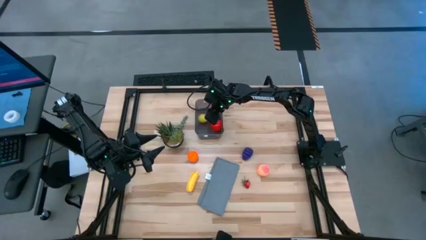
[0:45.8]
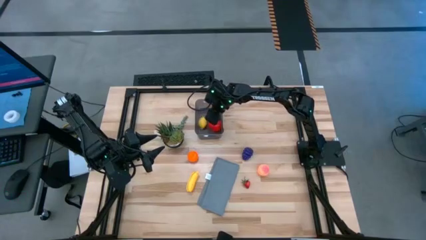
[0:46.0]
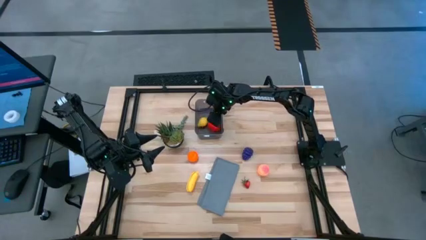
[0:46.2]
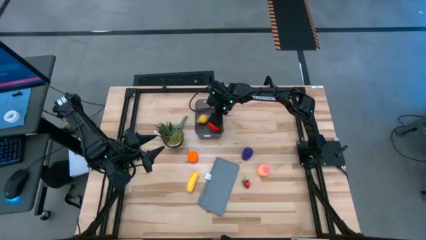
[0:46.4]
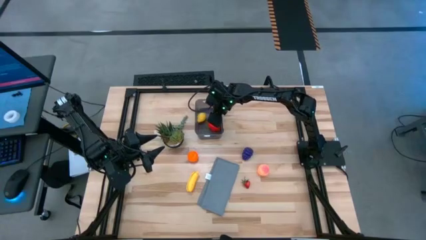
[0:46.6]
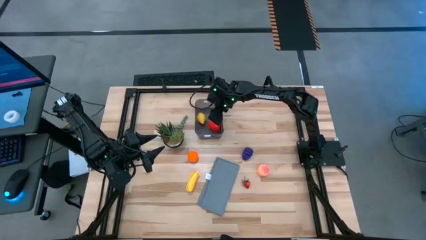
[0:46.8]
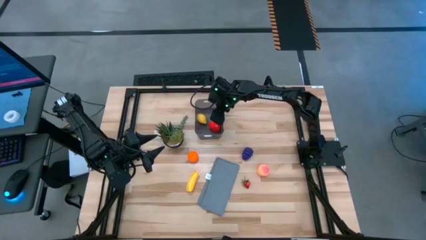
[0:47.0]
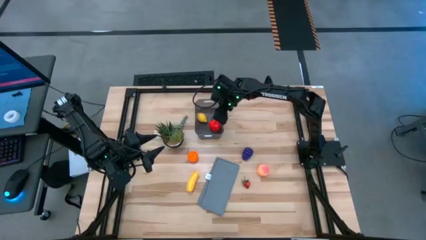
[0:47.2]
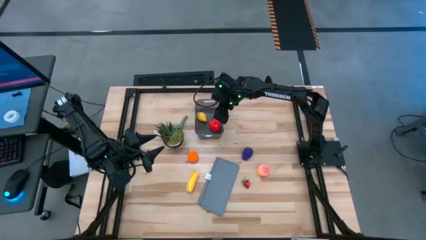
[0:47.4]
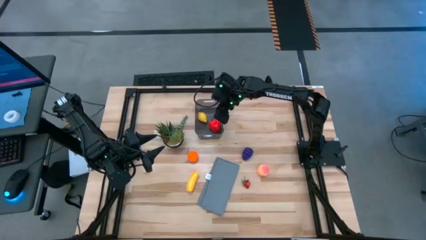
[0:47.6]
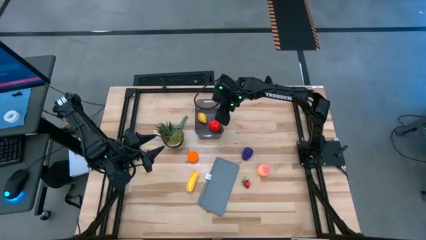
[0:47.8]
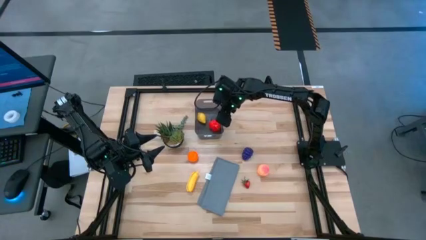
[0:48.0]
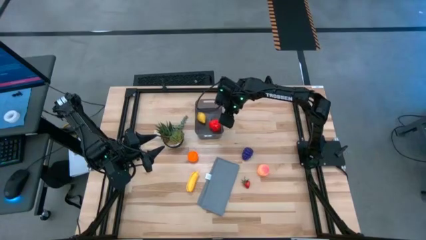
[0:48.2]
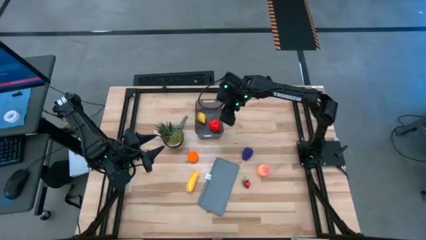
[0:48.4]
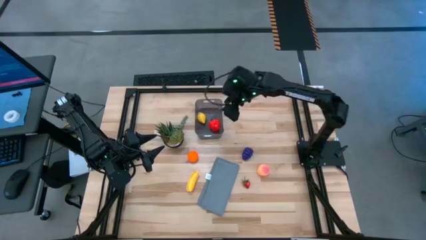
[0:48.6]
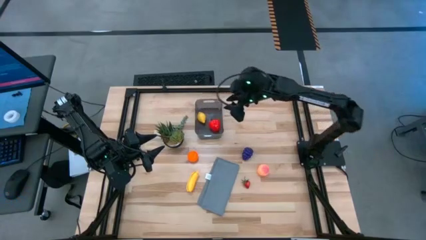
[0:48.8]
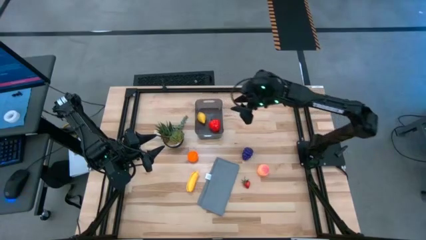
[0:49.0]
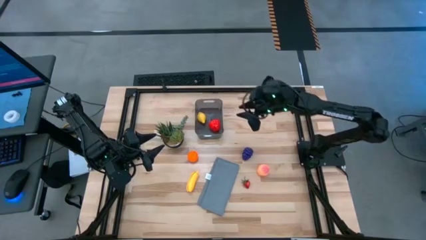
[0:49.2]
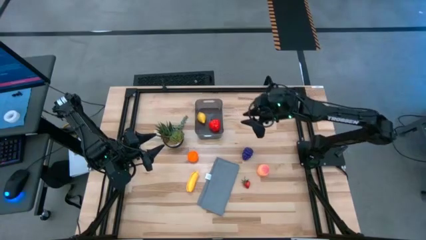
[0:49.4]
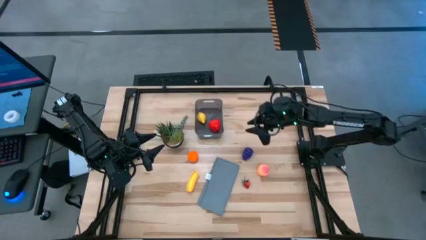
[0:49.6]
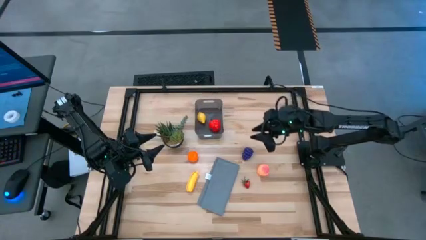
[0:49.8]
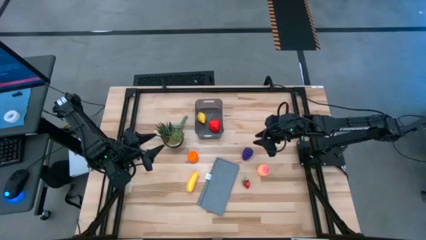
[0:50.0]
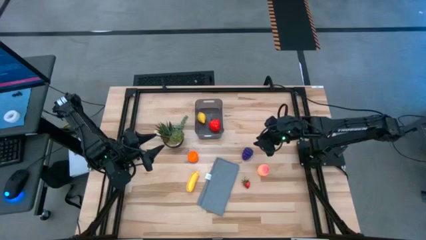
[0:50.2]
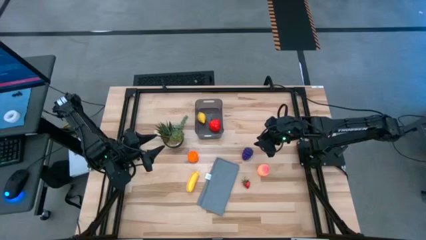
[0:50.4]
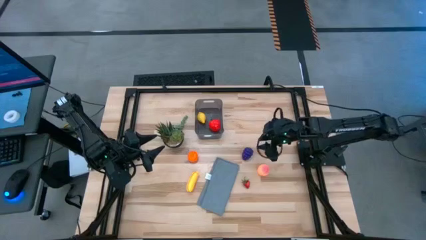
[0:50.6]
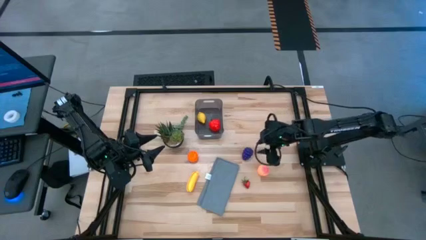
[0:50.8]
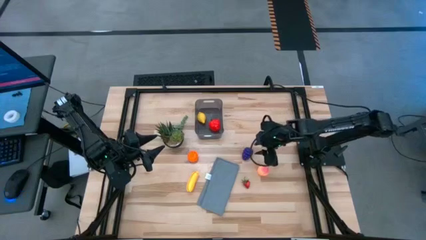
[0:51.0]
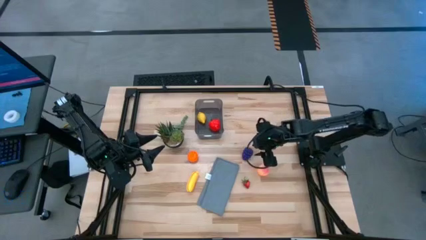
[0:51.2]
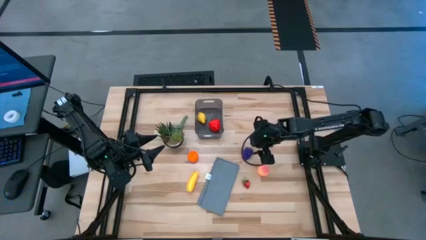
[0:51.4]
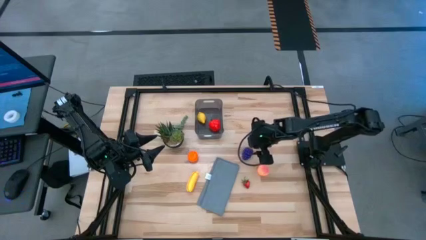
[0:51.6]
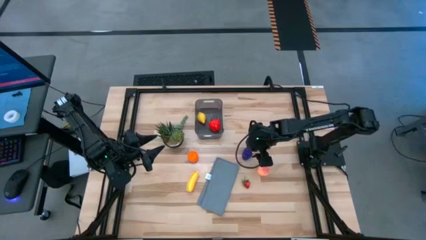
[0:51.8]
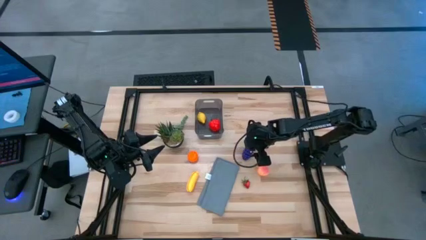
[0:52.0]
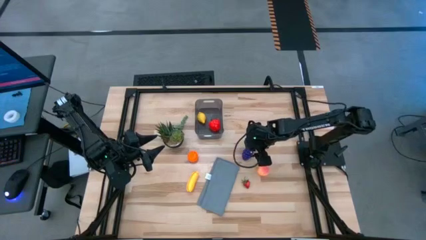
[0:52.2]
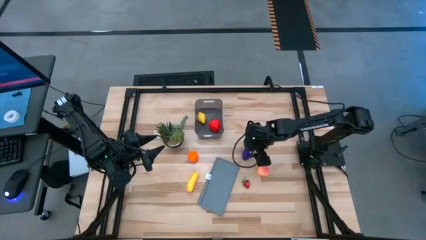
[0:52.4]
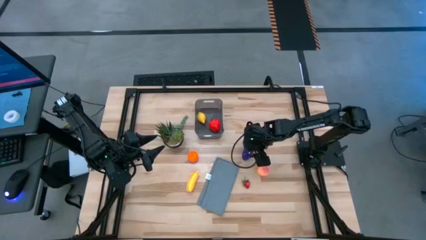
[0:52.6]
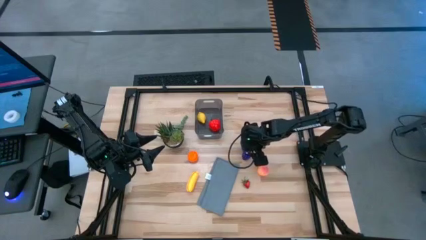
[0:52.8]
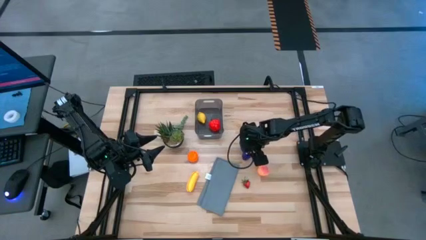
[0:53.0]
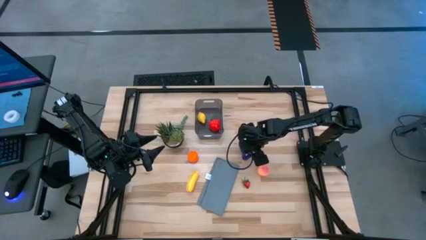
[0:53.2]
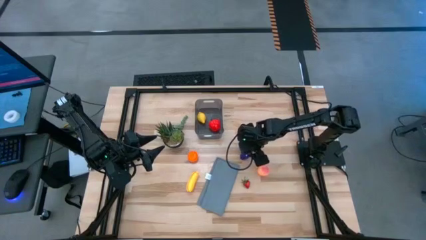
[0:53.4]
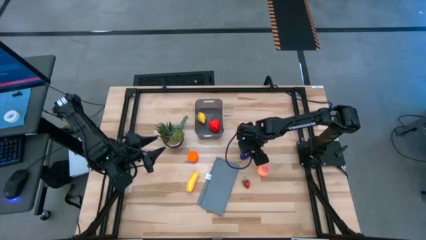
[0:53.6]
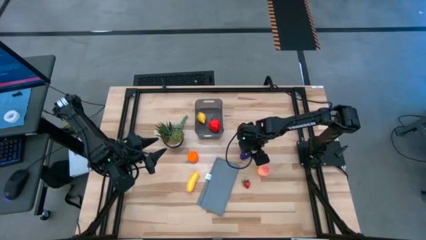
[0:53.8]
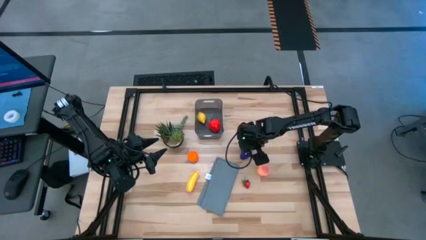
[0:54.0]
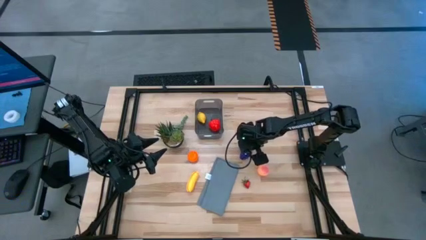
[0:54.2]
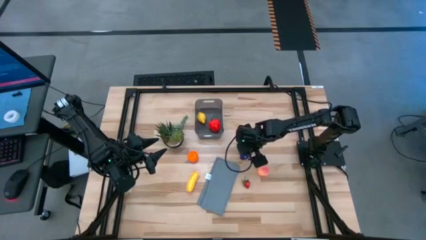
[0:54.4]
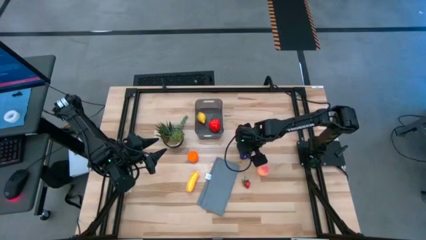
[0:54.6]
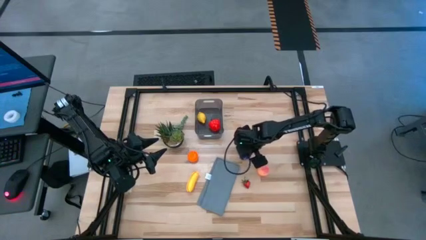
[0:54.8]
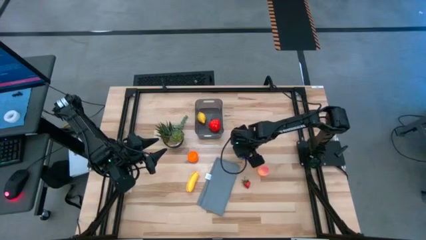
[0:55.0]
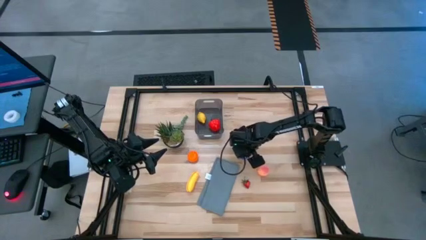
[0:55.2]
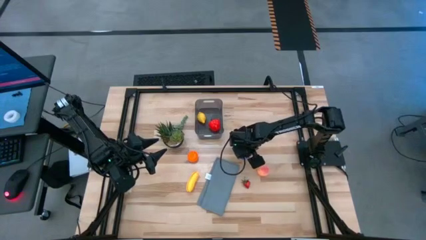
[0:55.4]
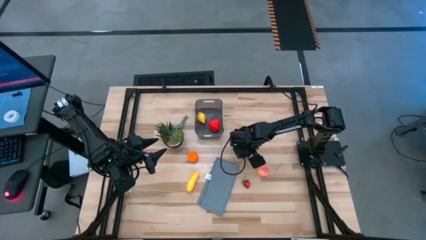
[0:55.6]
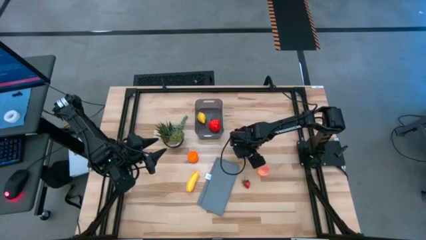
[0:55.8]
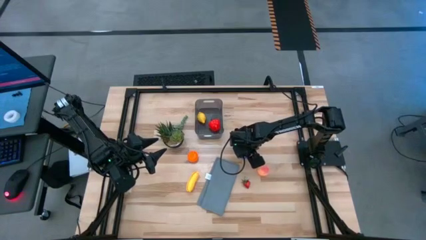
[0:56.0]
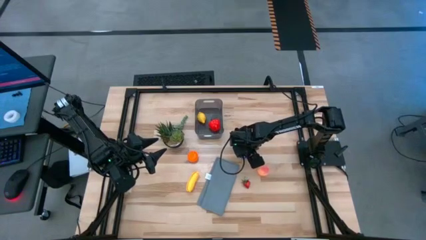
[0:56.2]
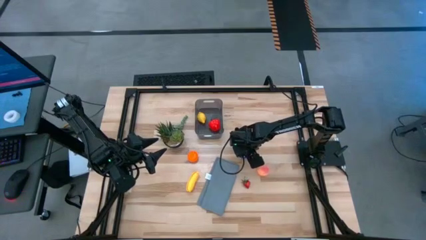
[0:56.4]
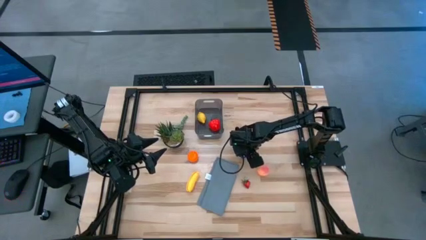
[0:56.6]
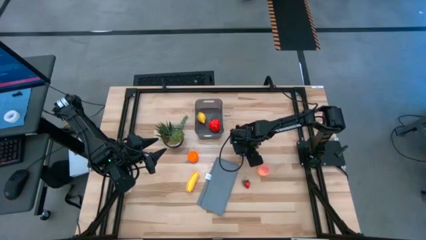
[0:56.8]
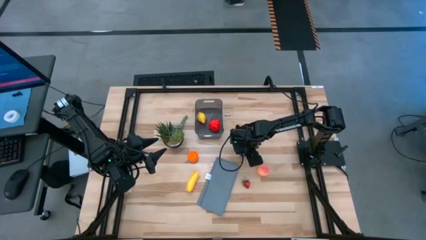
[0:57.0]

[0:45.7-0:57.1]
Task: Pick and placing Produce into tupperware
Put the blue grapes into the black bin
